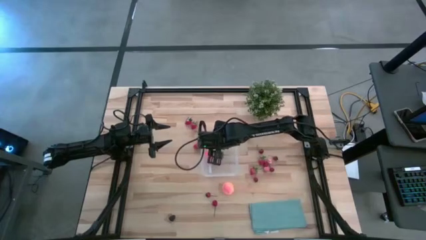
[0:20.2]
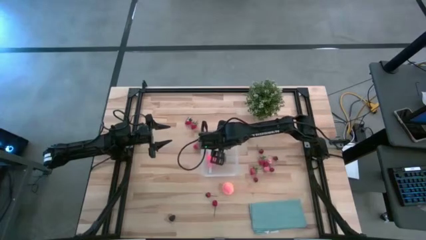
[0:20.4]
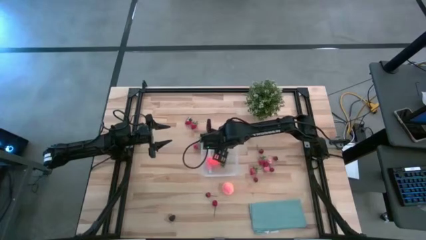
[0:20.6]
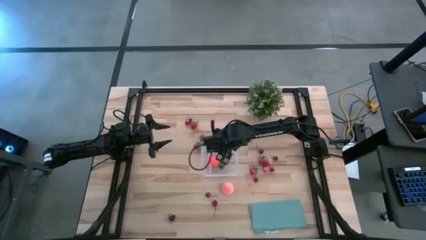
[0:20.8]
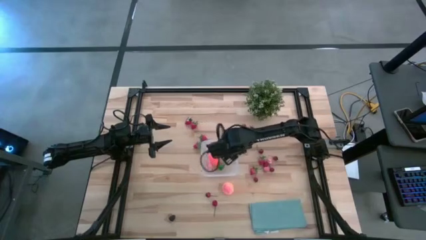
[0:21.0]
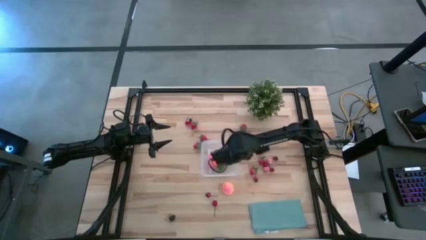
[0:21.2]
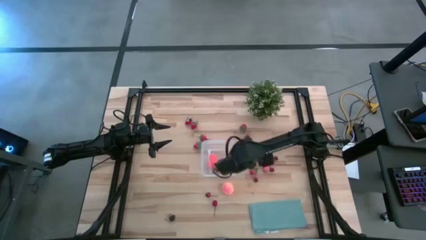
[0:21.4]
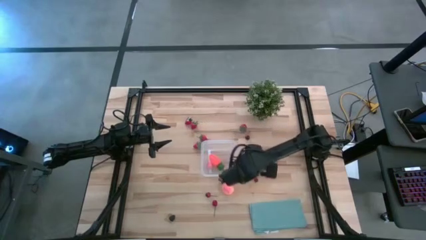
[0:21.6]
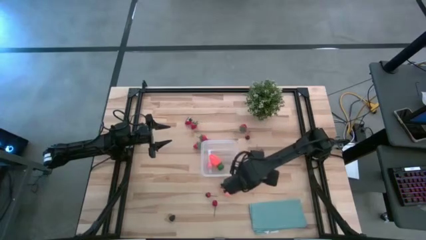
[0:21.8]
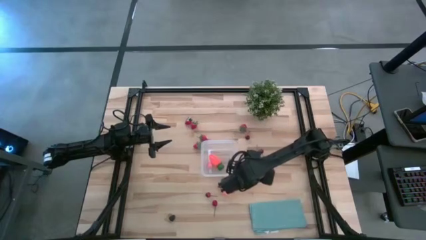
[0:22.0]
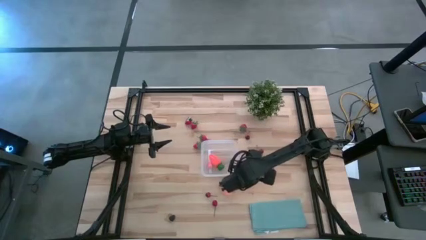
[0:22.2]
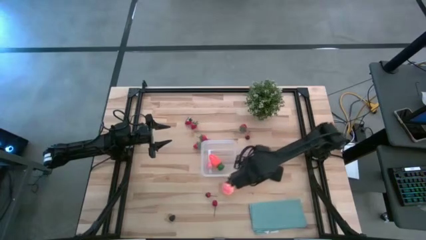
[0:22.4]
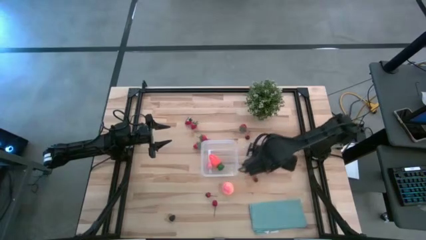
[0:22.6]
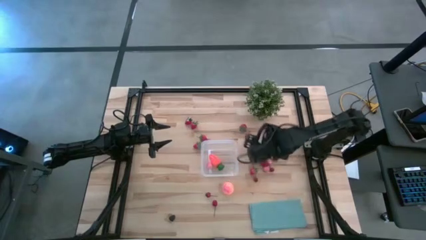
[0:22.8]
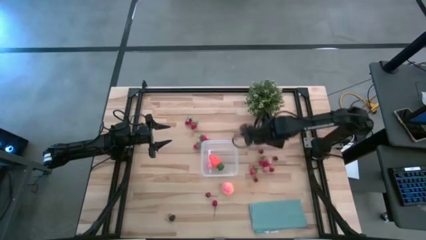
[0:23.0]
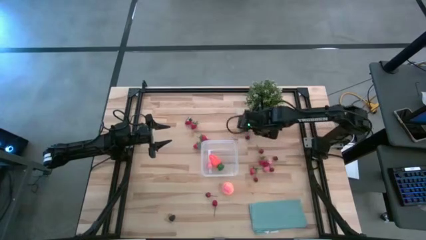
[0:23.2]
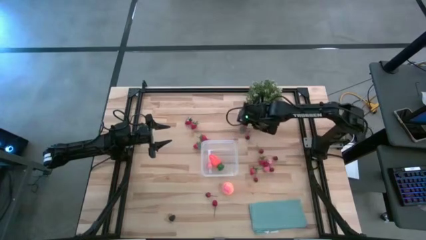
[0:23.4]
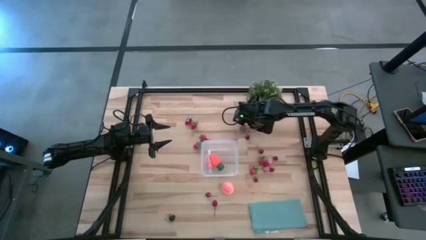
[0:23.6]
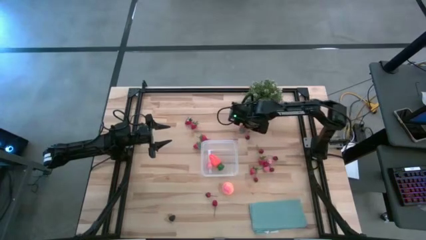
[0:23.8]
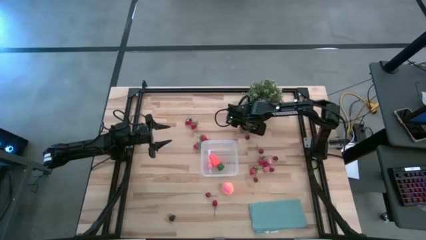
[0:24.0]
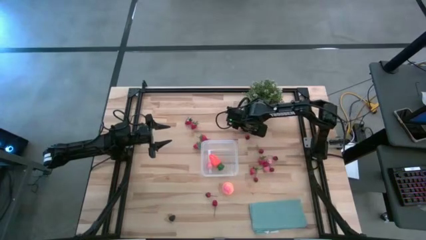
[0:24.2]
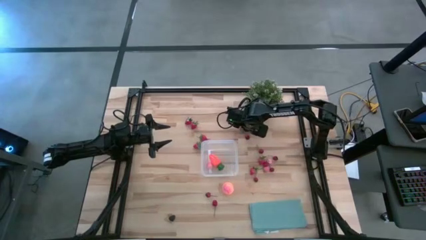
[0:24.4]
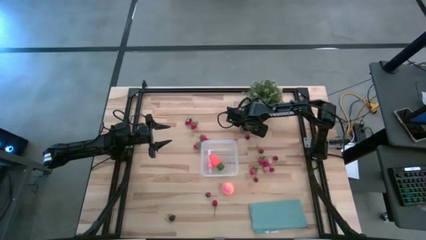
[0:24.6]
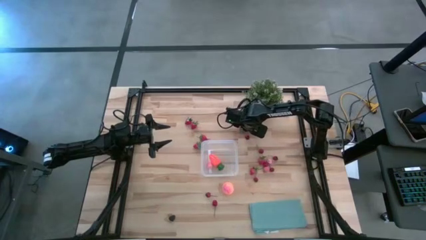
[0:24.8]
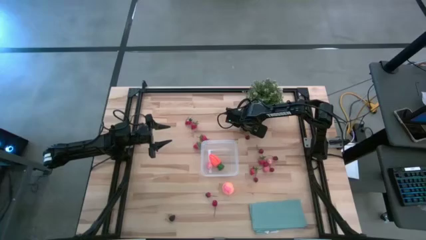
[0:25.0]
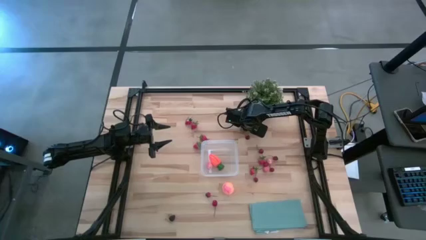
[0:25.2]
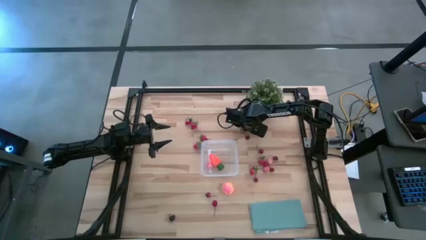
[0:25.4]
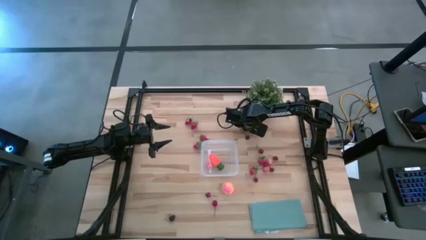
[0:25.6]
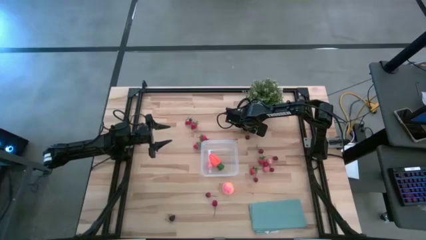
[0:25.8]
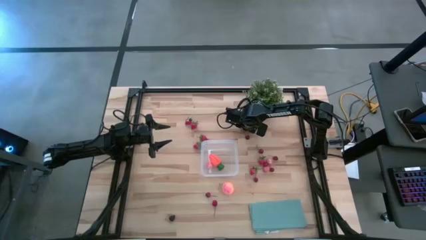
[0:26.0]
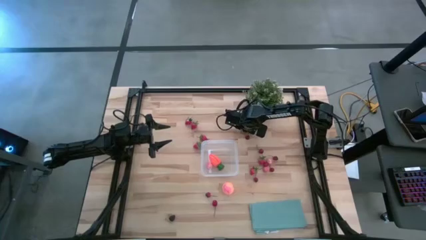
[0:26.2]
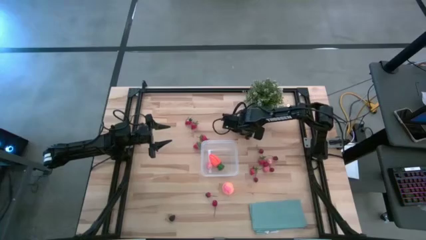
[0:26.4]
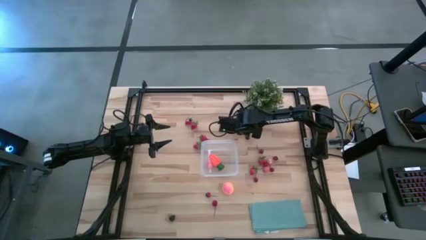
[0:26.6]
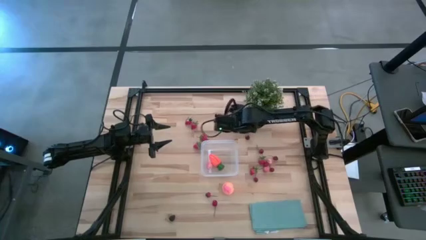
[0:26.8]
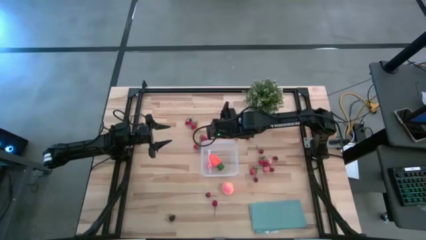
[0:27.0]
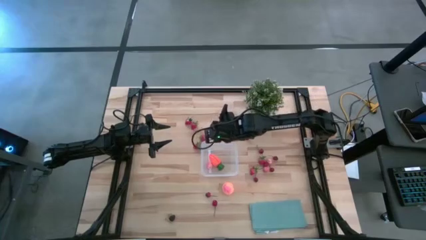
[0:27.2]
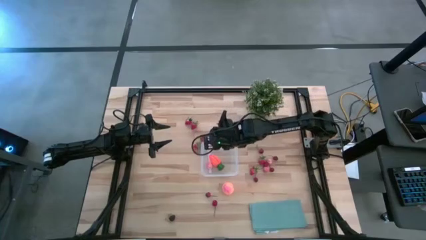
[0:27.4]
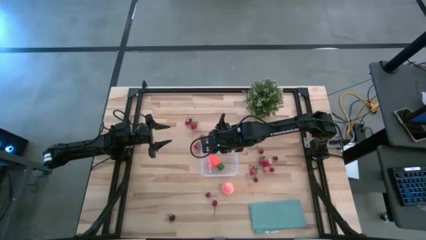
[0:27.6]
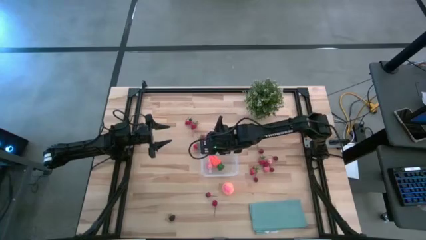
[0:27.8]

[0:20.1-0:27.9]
Task: Pick and placing Produce into tupperware
Put the strawberry into the transparent bin

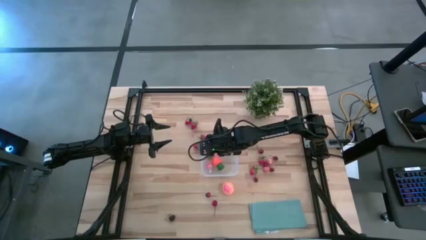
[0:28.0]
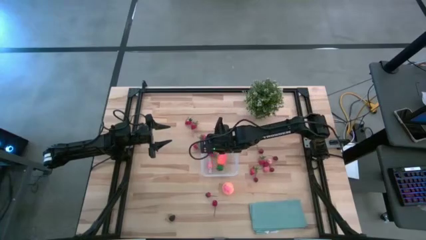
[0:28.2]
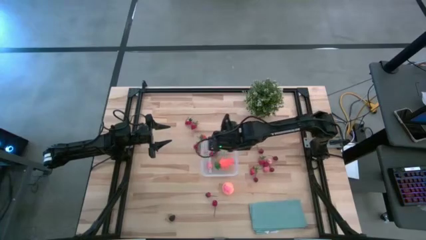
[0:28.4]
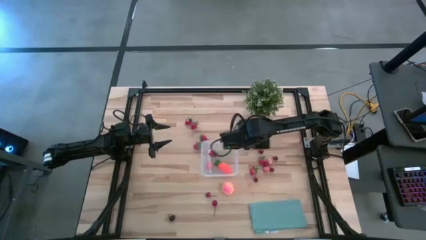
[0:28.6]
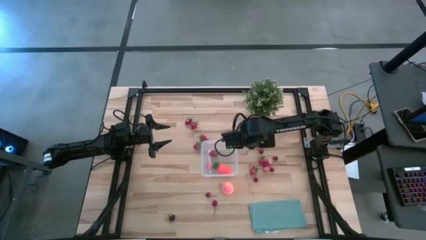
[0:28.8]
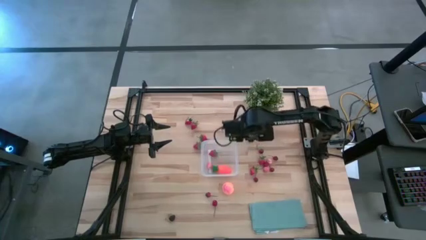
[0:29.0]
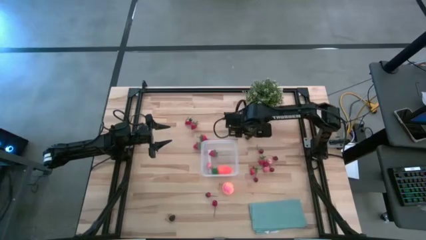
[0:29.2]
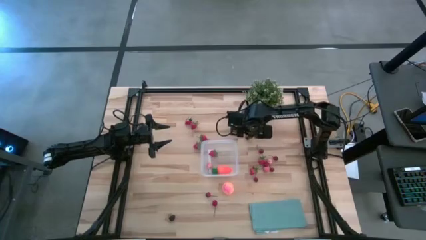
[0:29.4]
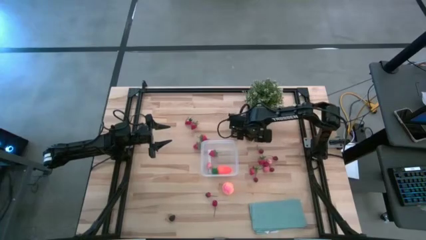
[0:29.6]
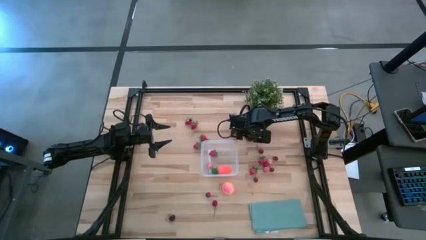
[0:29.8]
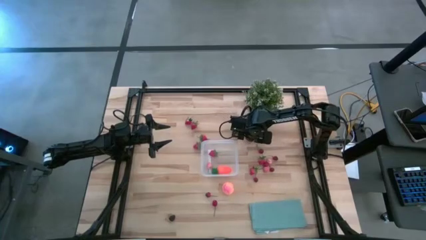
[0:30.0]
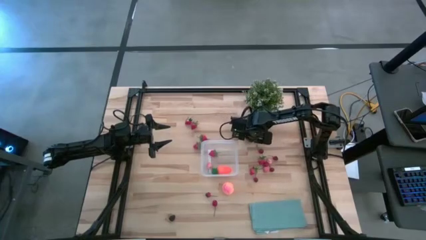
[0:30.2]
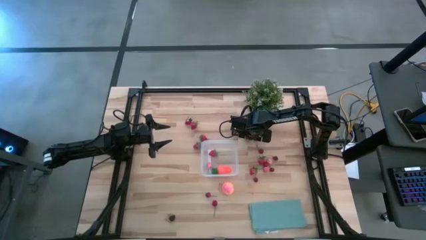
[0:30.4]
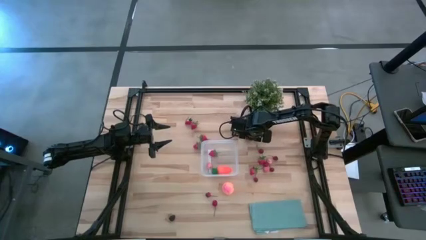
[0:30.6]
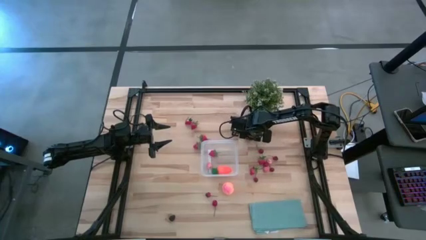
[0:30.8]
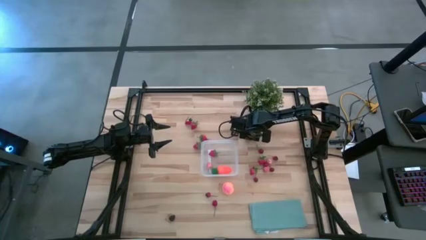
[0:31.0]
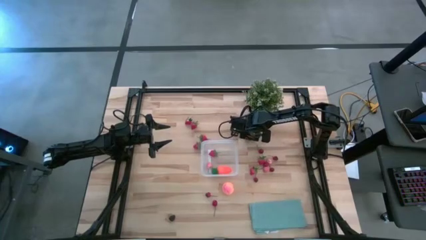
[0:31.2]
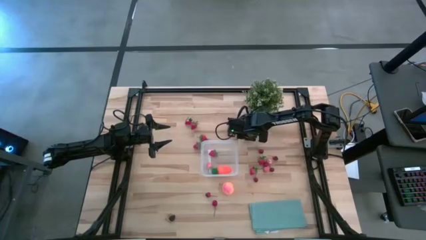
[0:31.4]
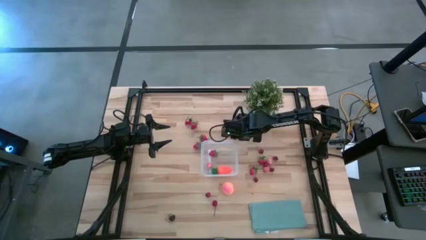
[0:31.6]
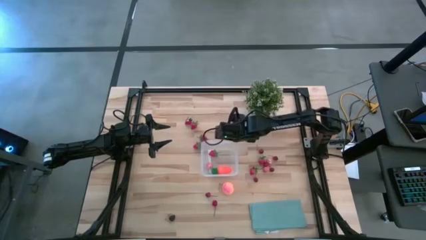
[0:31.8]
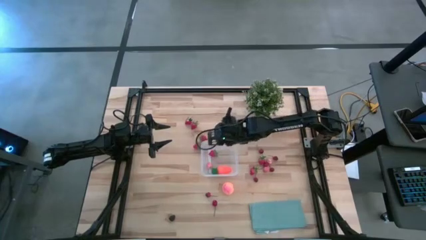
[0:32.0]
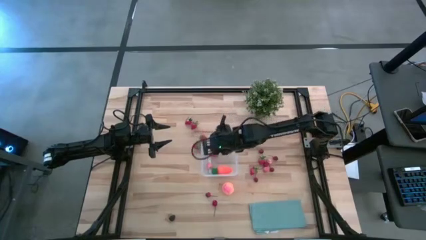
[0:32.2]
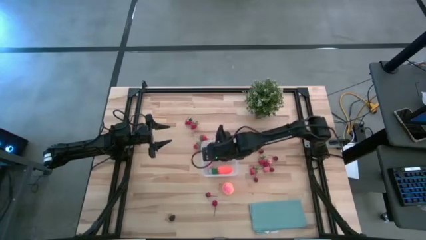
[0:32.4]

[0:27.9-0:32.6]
Put the cherry into the transparent bin

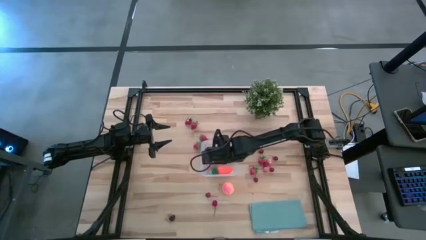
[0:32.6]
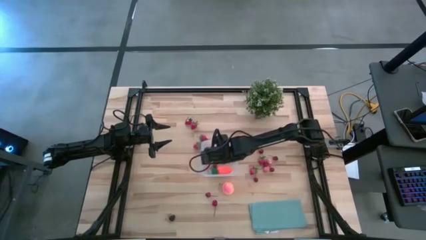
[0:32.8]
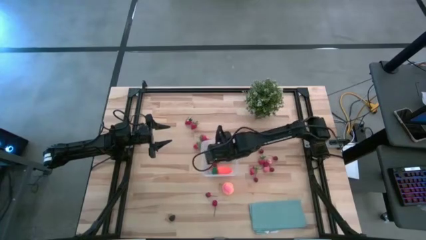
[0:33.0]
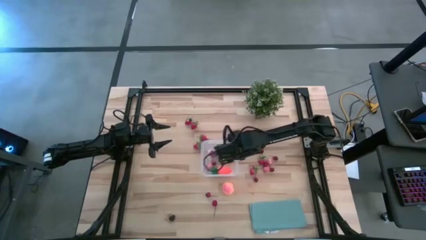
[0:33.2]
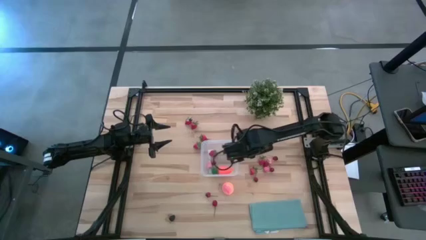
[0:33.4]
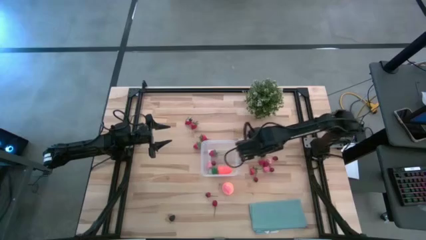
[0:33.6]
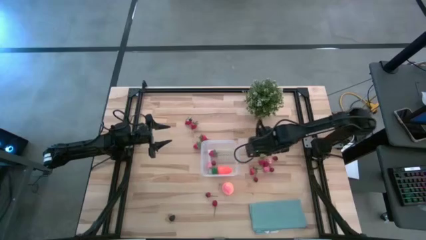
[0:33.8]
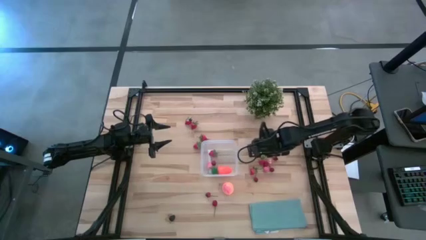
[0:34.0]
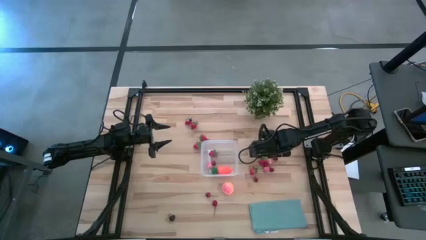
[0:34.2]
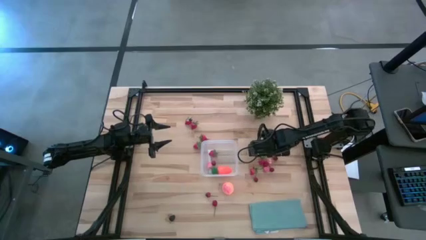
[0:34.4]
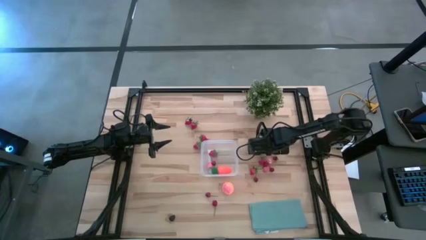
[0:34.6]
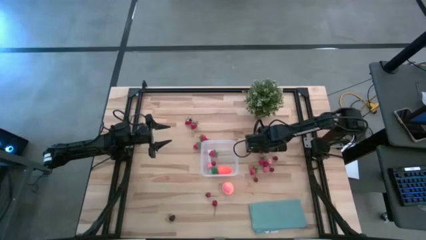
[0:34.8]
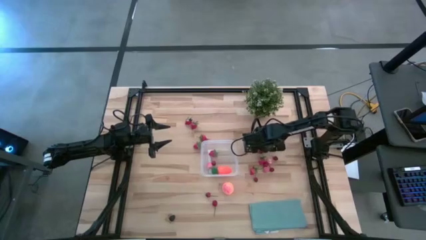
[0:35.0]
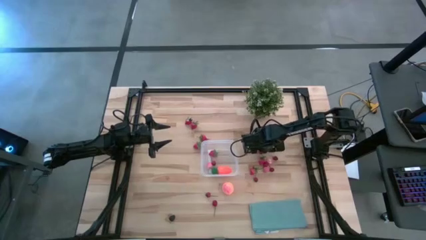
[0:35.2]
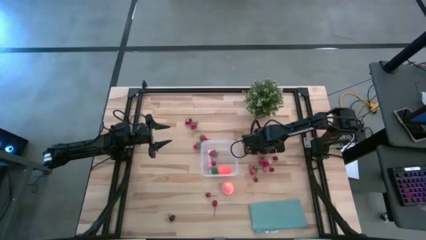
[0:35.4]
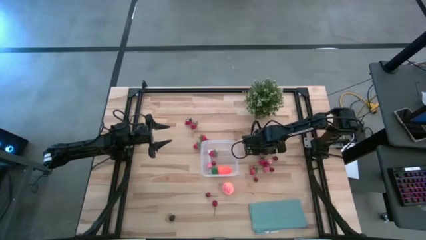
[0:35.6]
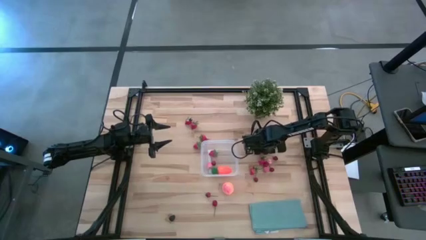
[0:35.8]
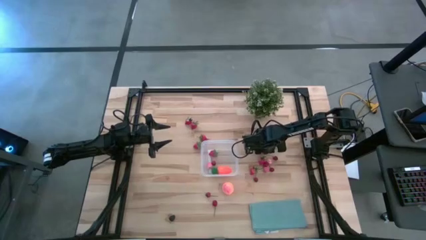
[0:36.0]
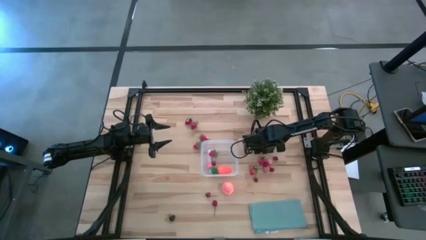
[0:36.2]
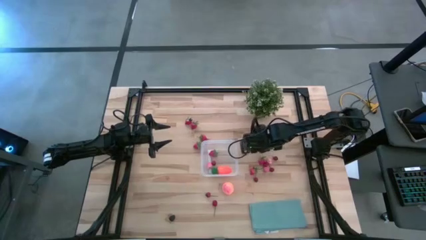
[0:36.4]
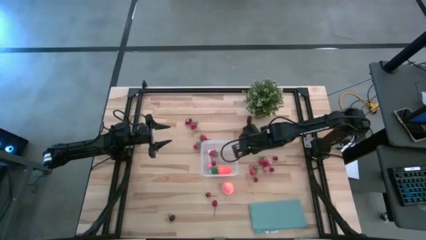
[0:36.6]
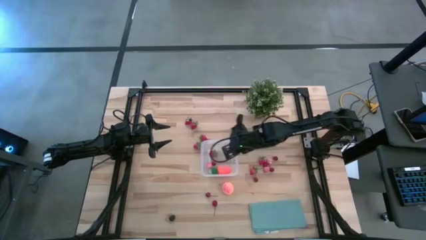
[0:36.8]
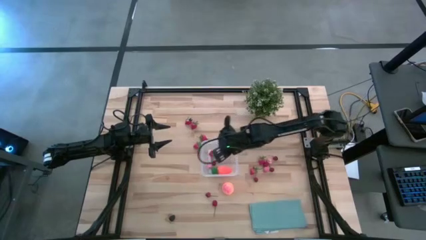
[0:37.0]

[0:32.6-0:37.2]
Put the cherry into the transparent bin
